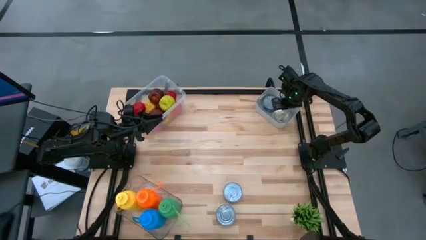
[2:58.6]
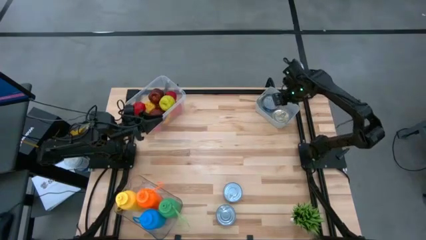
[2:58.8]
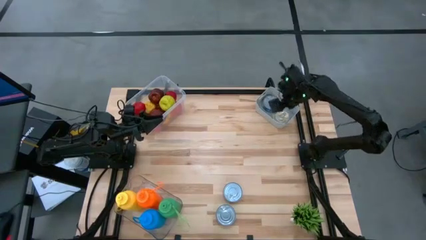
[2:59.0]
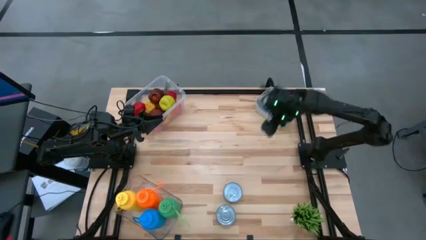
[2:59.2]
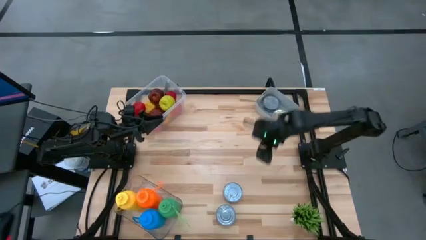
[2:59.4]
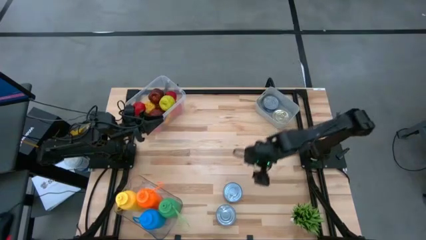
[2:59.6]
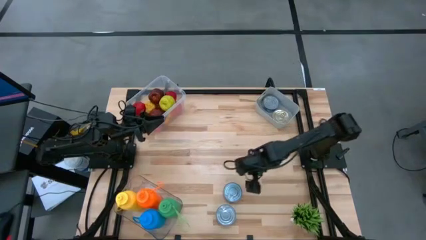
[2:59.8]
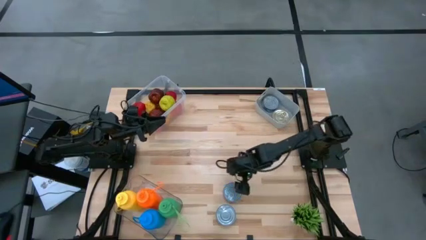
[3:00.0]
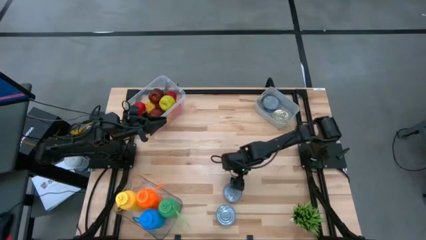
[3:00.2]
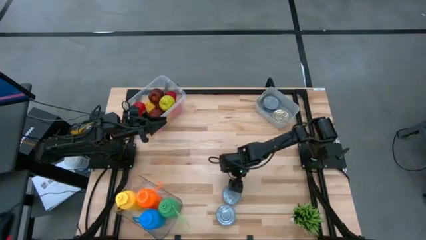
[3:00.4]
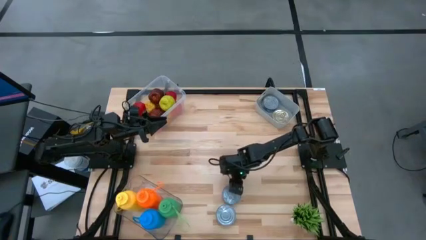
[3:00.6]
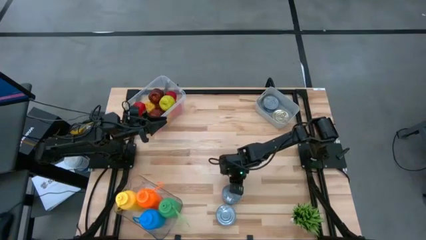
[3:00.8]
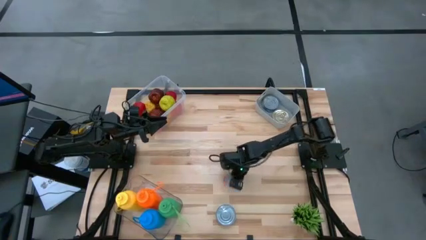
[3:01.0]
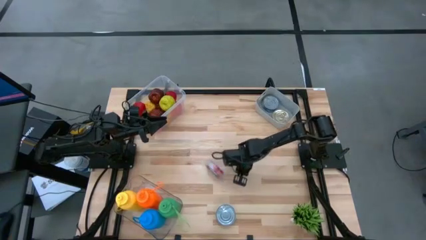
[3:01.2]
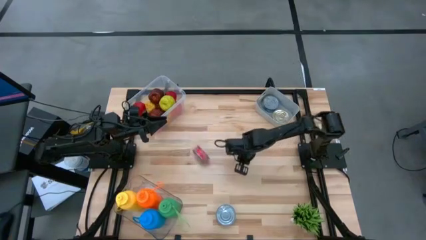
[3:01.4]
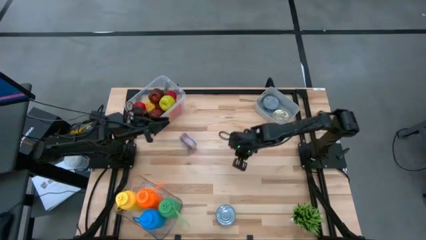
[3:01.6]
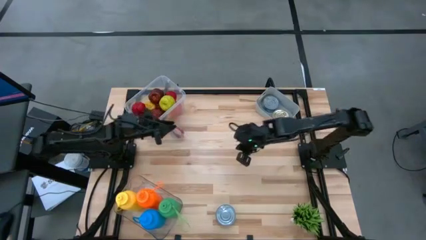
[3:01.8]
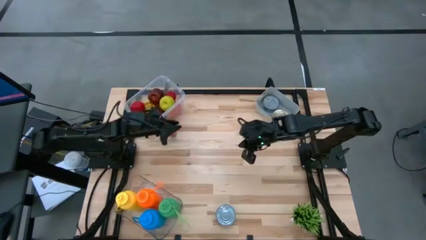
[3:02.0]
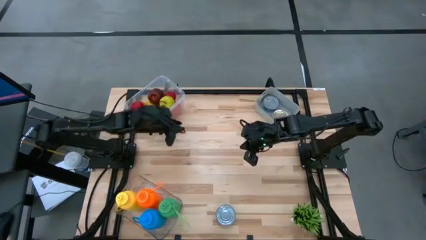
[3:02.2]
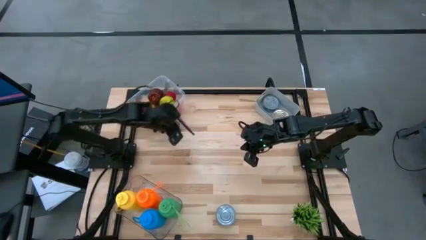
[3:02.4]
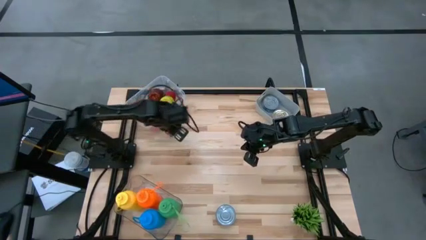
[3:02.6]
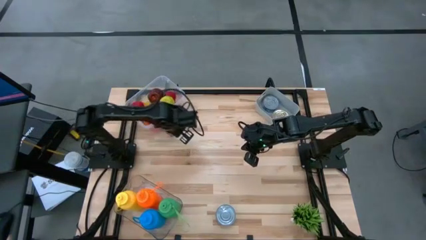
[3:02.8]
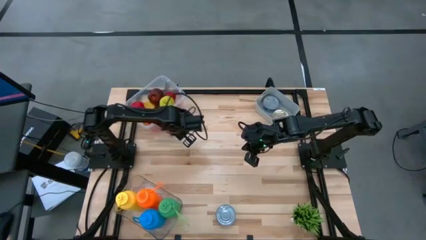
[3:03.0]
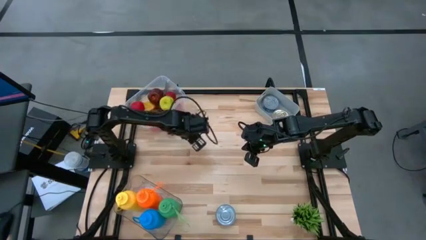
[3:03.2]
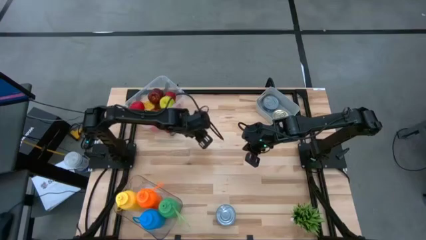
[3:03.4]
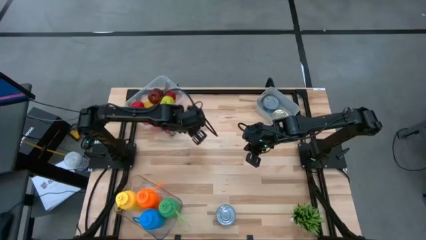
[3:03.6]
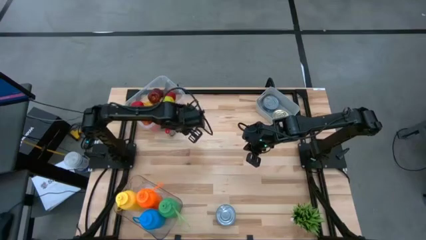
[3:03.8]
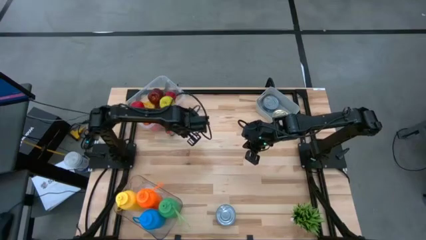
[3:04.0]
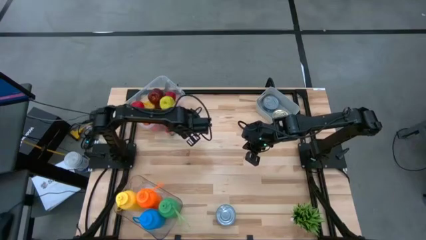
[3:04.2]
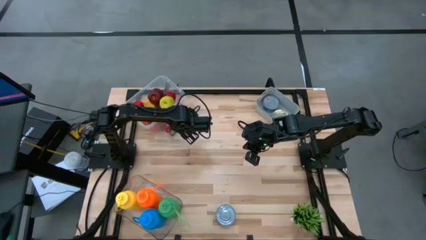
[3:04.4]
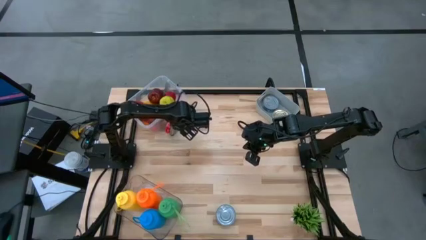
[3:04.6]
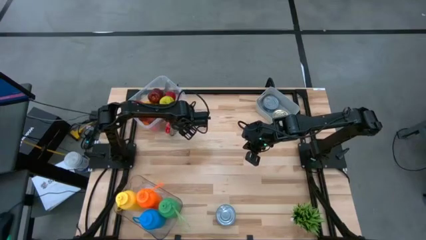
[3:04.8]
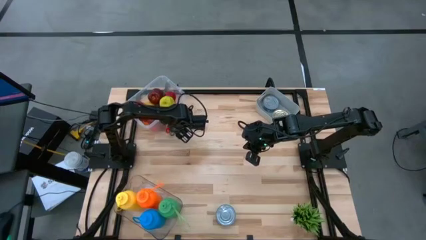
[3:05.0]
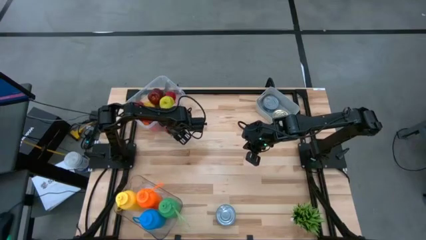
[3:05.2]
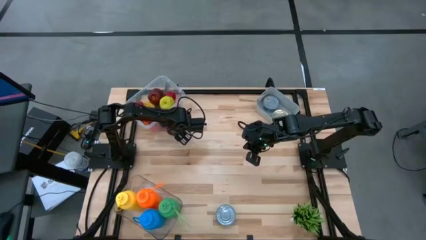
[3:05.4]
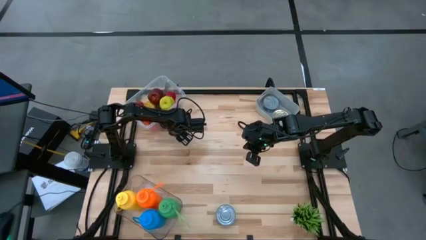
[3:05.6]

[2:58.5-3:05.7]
Task: Pick & Place Food Item
Stack the red tuna can on the blue tuna can

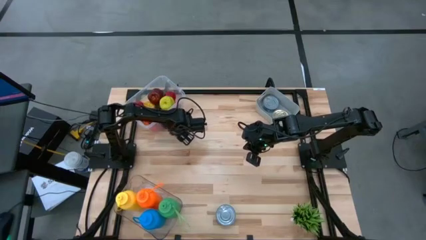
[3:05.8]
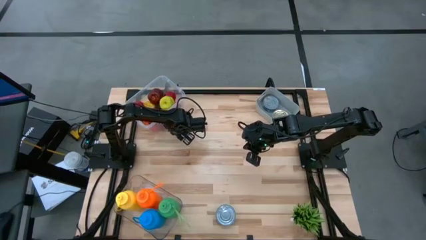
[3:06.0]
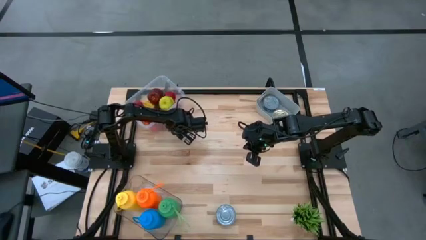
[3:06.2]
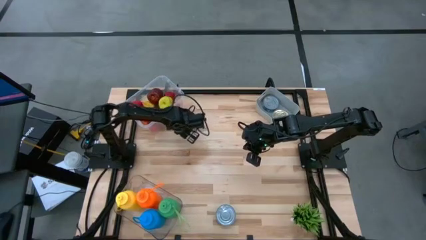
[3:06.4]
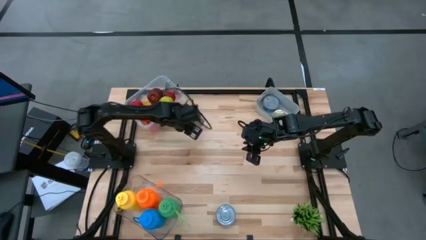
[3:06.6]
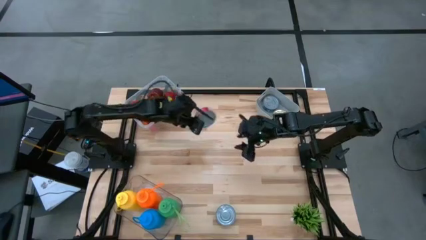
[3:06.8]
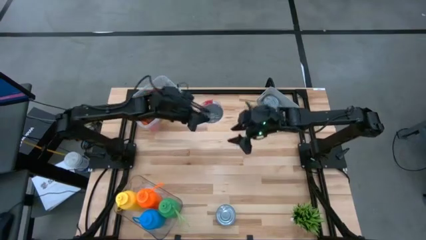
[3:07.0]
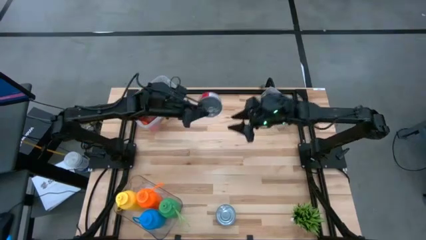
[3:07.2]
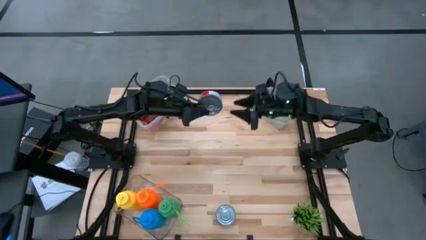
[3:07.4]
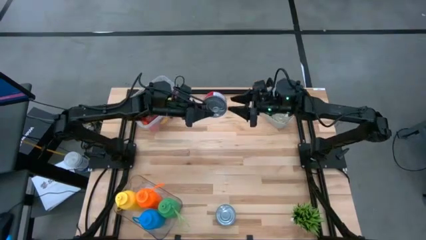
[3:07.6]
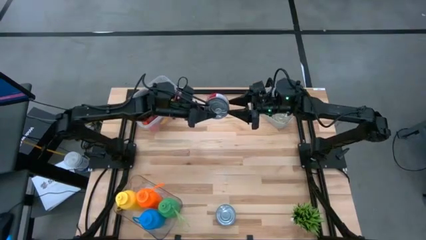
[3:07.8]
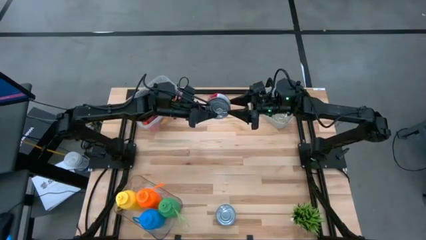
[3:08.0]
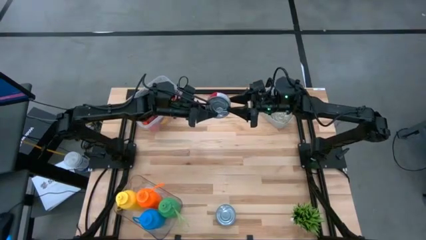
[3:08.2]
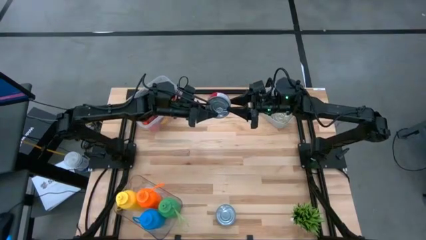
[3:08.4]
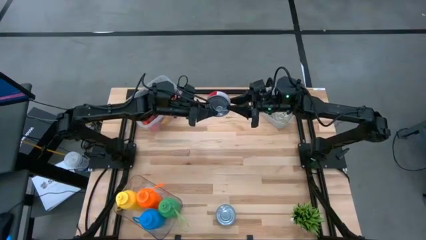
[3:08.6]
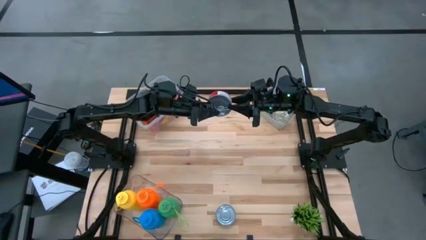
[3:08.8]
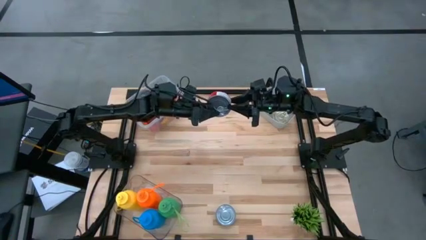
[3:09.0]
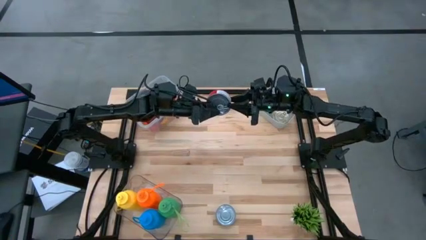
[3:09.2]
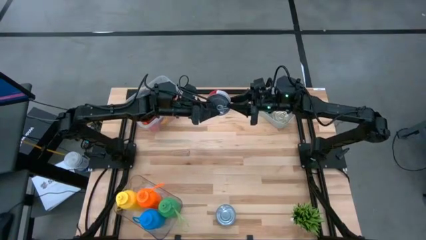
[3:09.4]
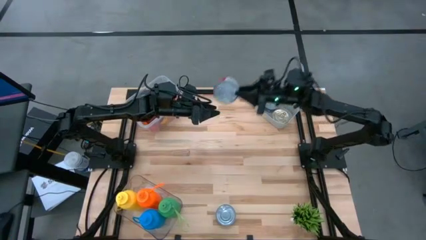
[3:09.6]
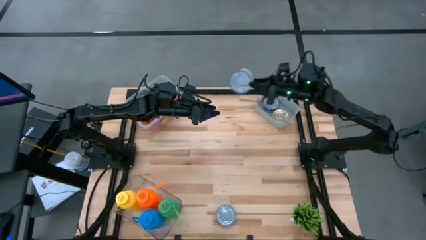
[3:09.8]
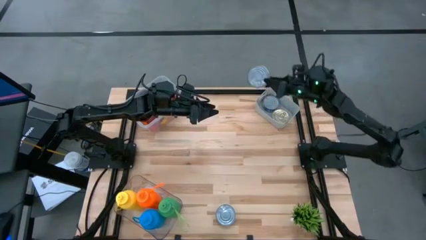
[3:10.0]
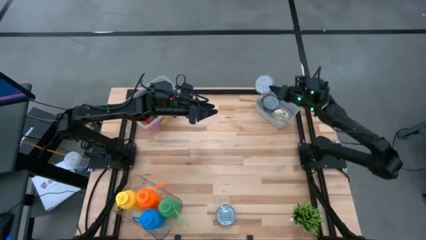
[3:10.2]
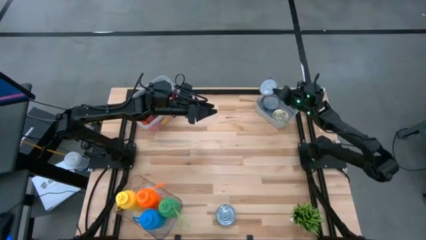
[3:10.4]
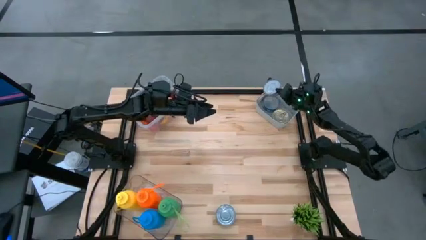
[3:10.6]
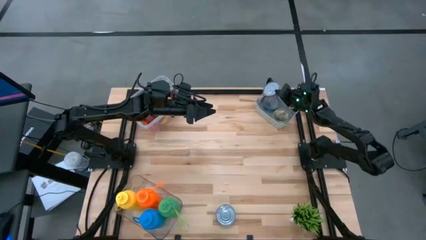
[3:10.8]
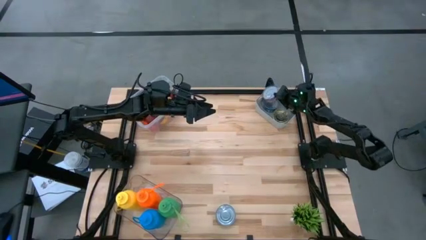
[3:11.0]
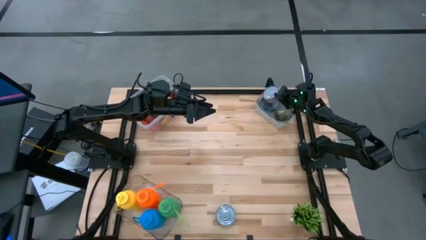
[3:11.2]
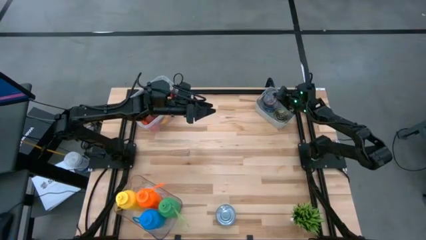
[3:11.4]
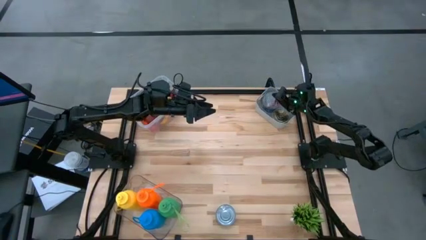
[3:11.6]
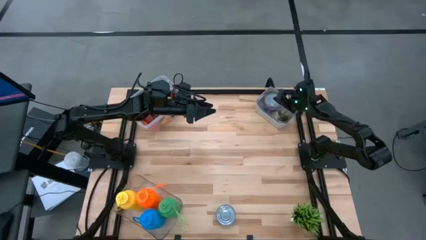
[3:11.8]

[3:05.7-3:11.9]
Stack the red tuna can on the blue tuna can

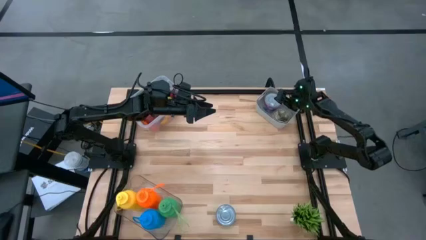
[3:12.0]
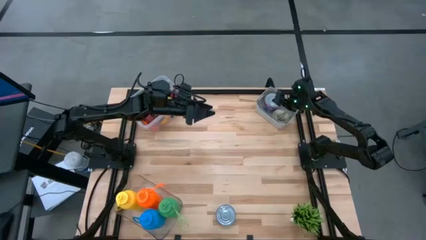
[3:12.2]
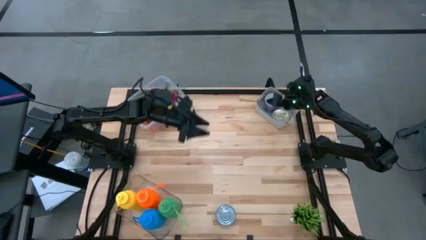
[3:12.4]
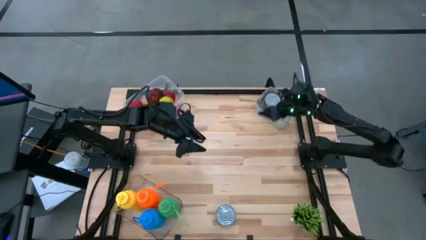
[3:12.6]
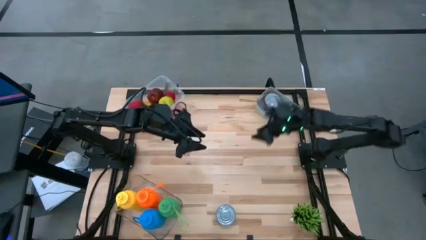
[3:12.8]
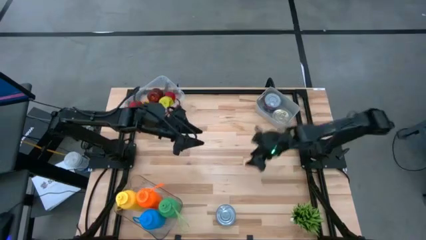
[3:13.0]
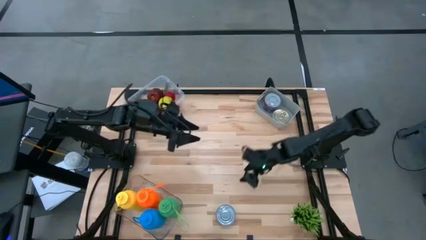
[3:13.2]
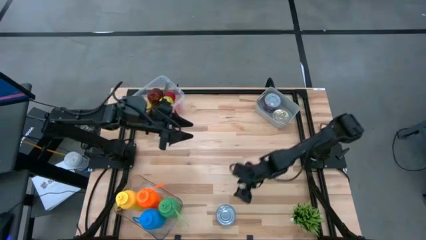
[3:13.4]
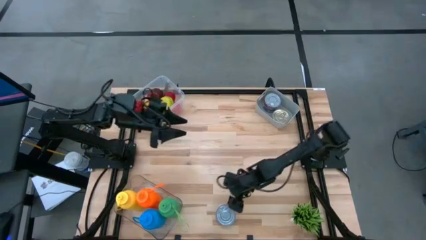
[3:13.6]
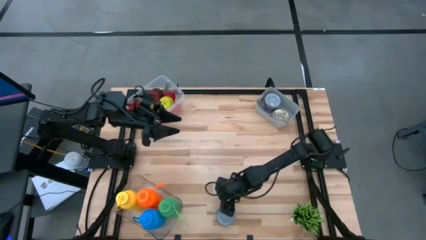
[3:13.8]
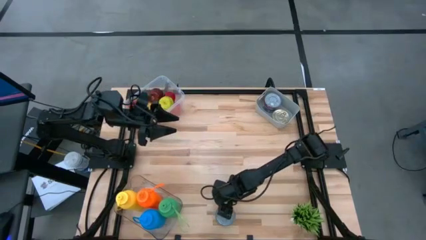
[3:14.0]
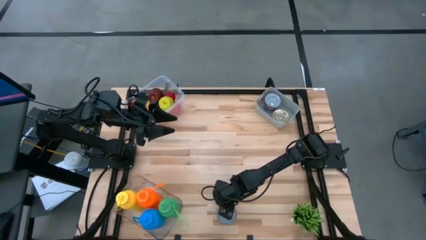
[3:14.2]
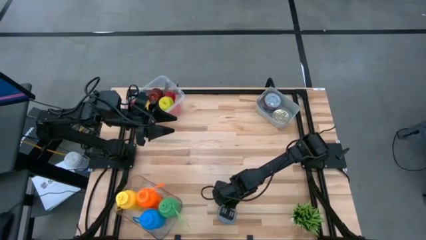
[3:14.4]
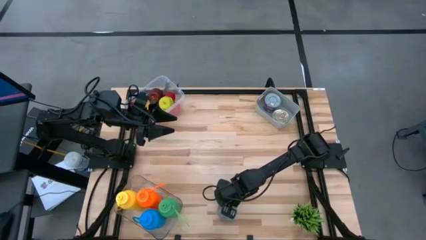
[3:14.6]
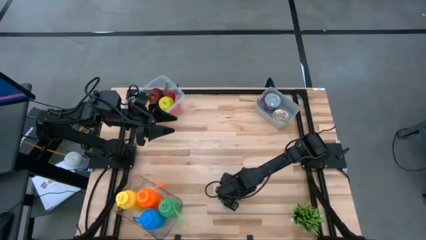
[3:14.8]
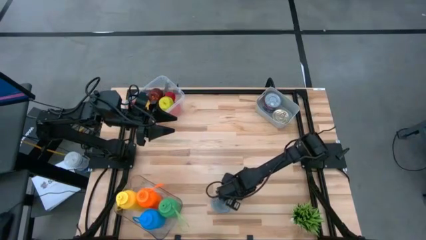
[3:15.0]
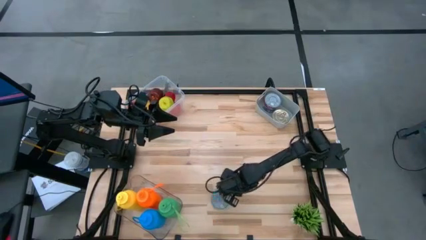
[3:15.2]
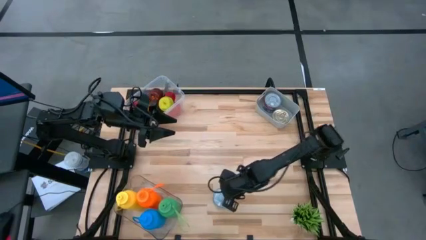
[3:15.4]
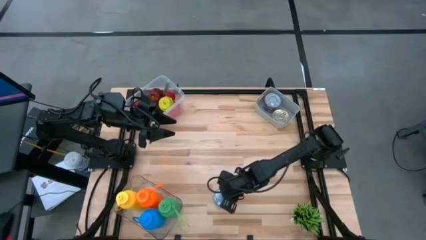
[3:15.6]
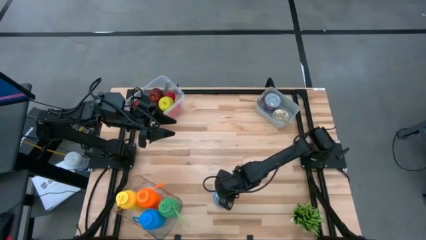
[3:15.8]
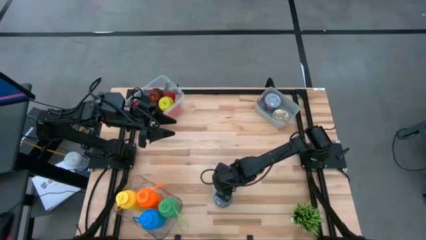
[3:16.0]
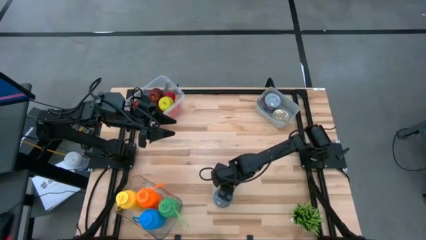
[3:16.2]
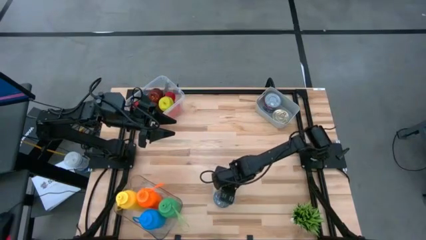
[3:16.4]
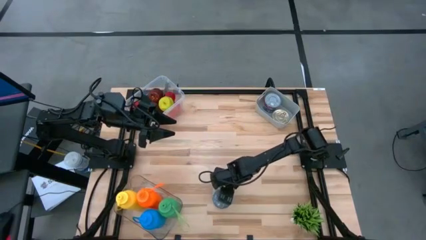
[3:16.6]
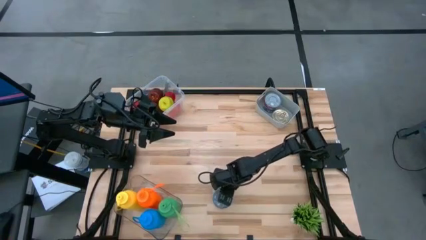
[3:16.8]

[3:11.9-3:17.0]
Stack the green tuna can on the pink tuna can
